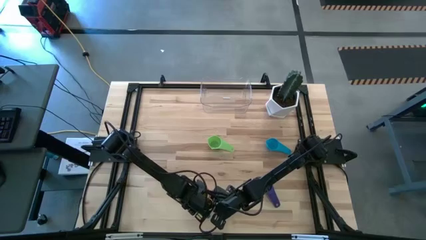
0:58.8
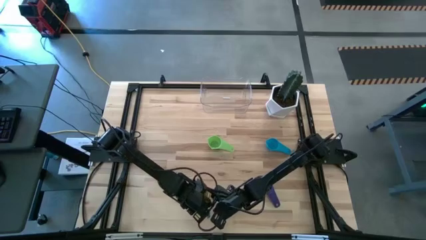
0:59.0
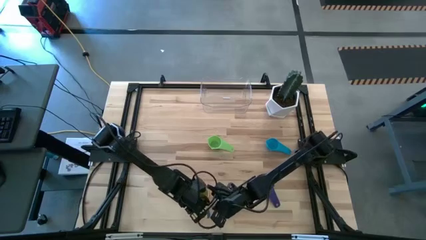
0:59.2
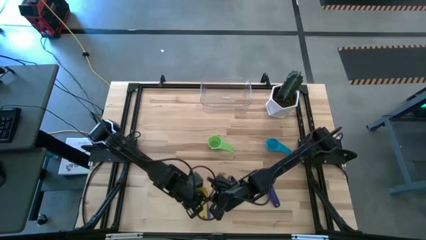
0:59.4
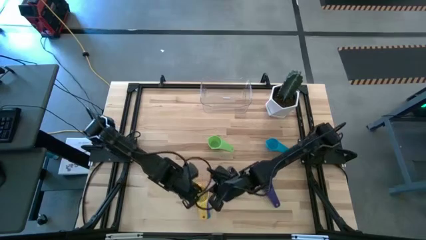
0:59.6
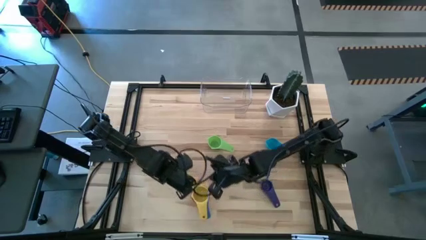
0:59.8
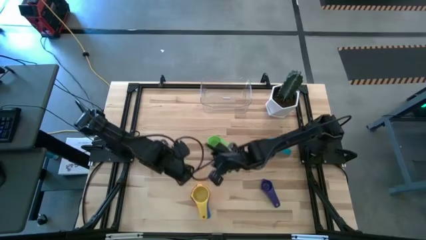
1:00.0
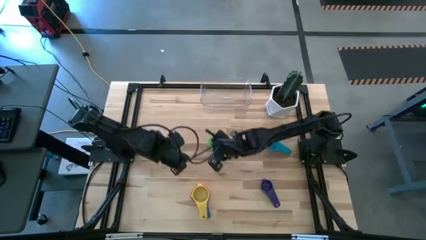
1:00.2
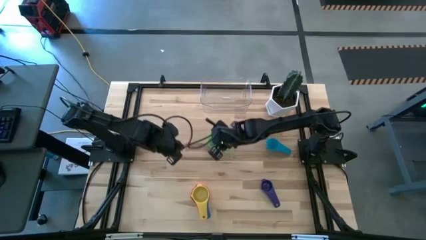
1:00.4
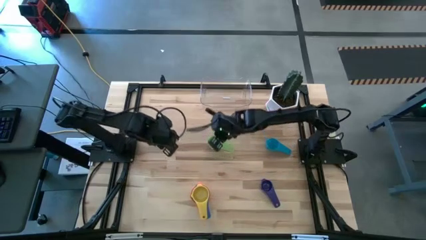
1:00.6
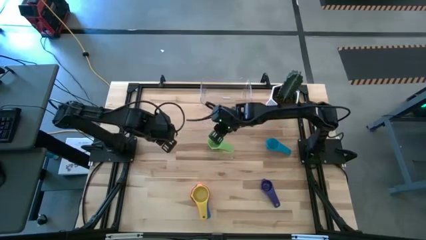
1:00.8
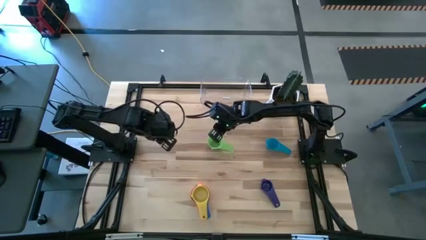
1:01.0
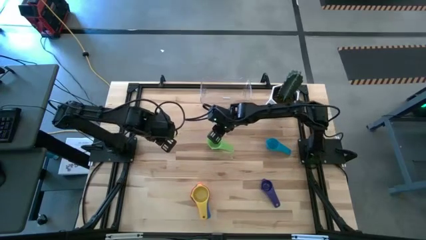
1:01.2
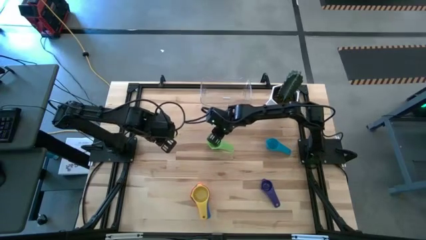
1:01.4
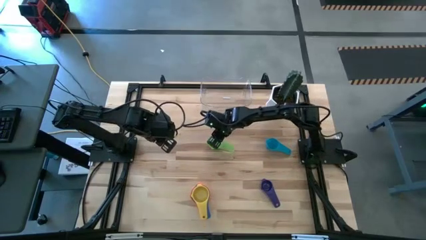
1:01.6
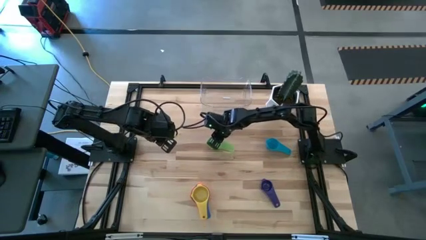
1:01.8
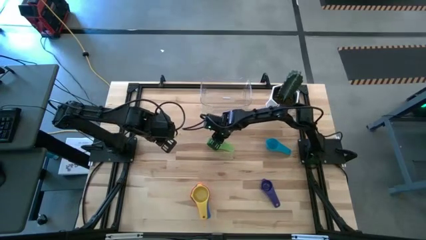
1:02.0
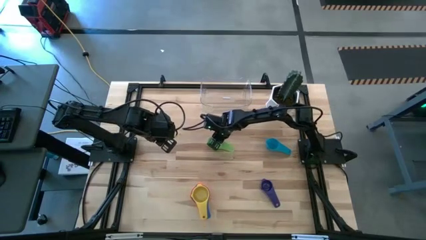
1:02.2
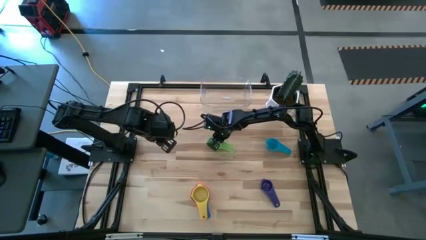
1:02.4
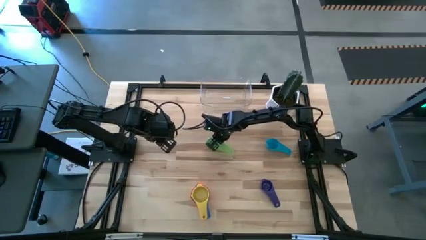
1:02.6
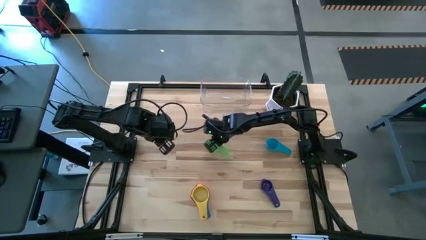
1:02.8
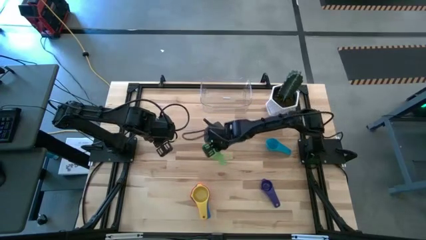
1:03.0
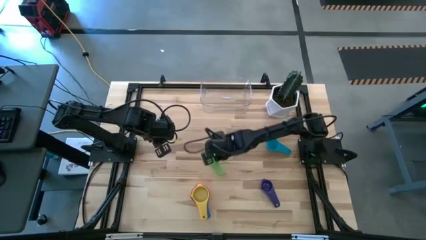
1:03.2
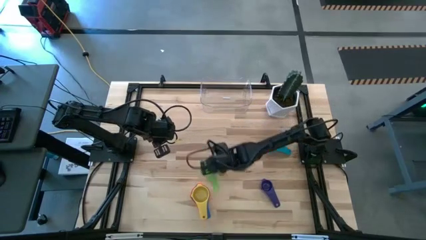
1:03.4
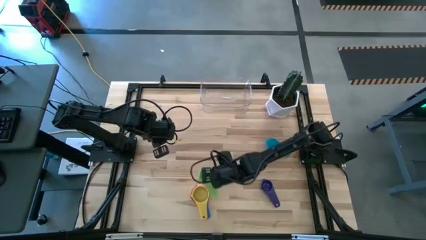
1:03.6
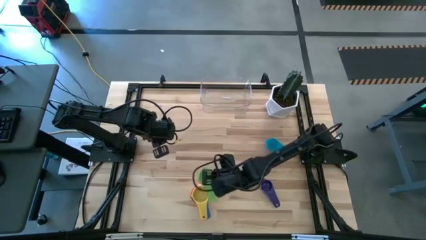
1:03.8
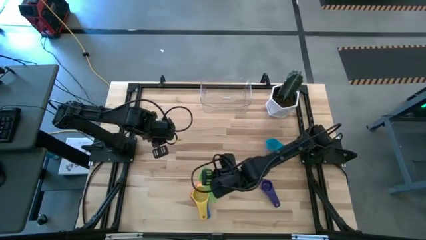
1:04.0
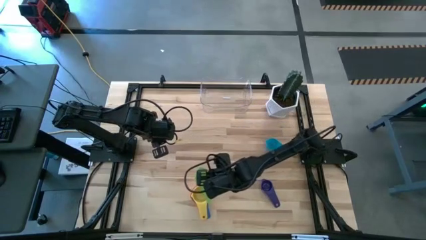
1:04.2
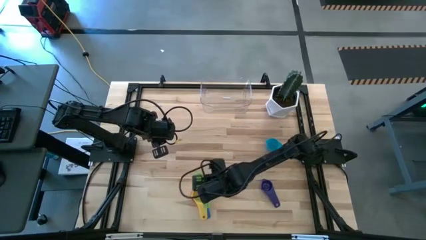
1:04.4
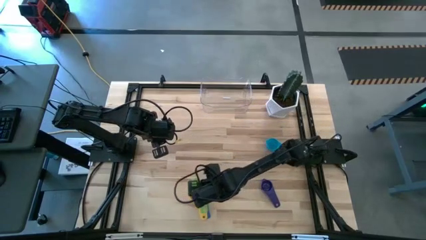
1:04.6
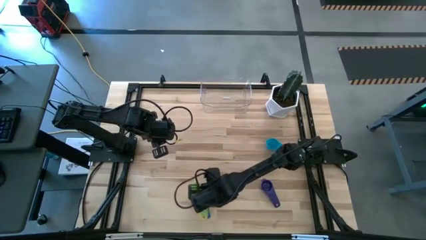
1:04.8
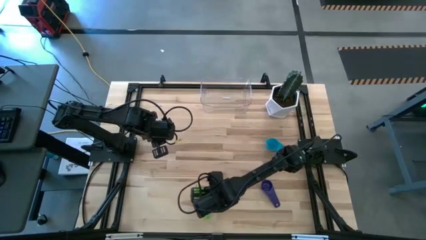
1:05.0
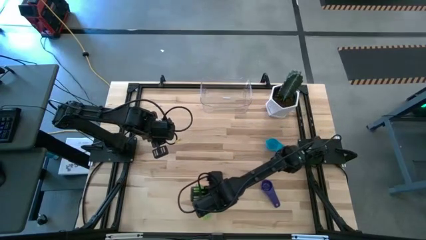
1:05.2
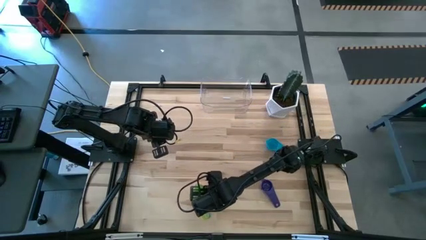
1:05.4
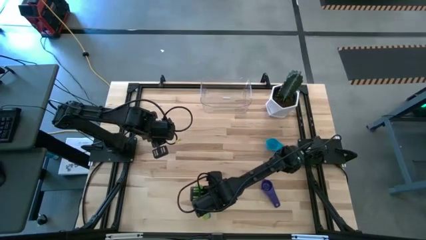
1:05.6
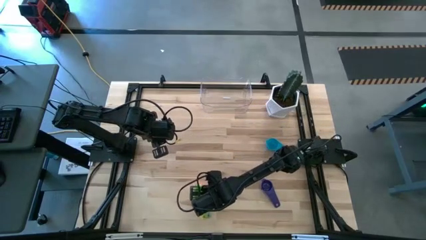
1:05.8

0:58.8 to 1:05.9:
Task: Nest measuring cups in basket
Stack the green measuring cup on top of the yellow measuring cup

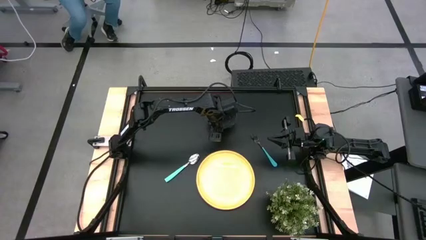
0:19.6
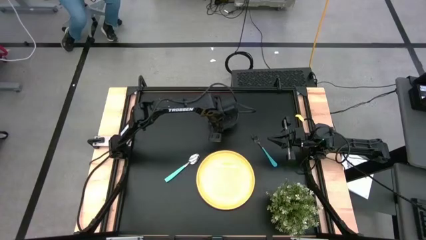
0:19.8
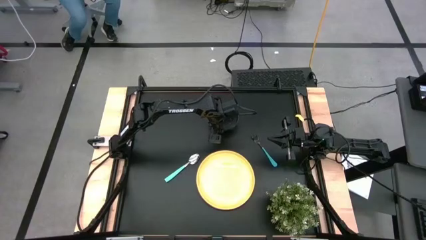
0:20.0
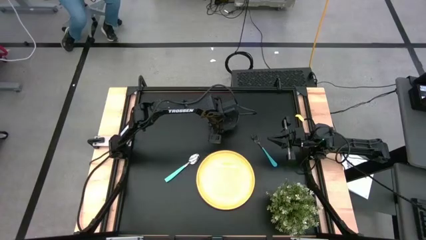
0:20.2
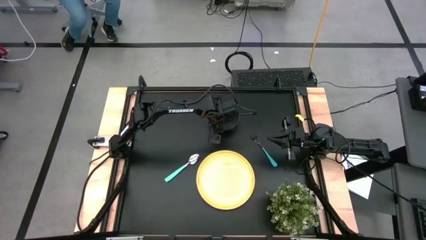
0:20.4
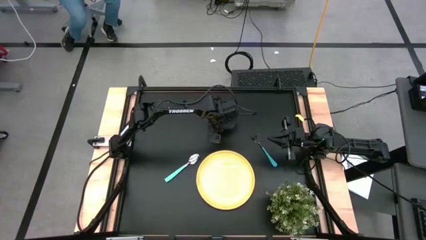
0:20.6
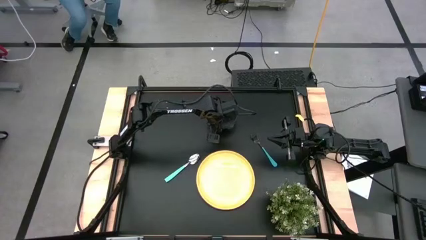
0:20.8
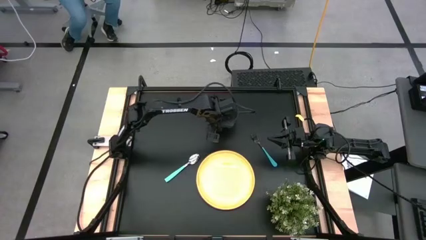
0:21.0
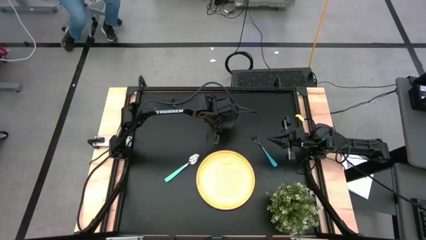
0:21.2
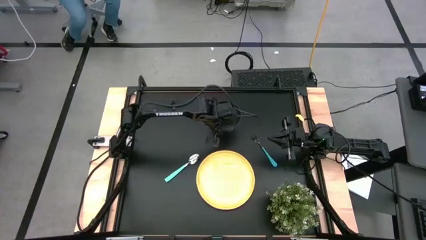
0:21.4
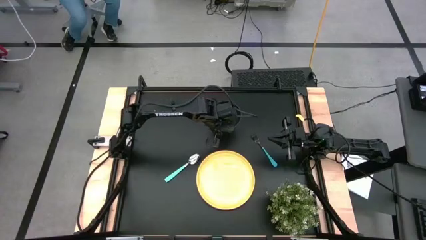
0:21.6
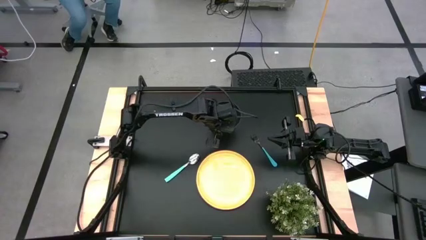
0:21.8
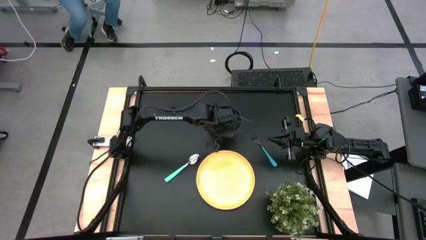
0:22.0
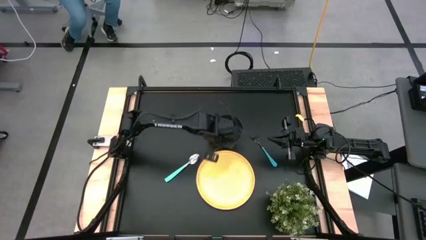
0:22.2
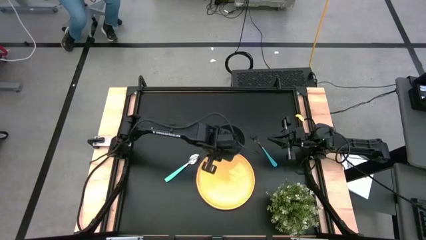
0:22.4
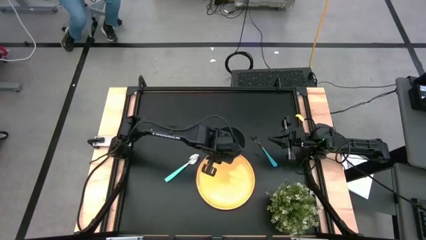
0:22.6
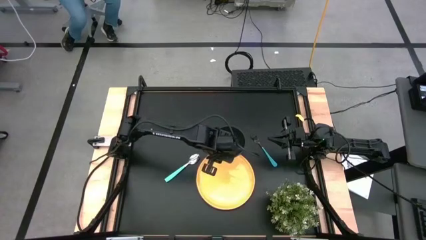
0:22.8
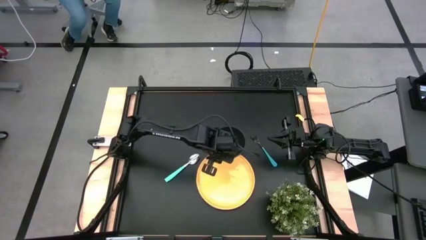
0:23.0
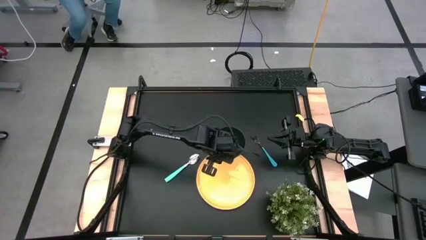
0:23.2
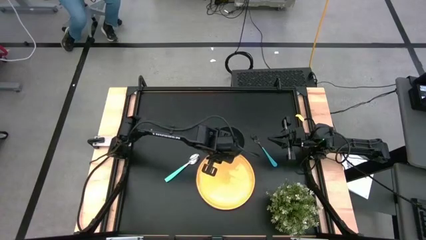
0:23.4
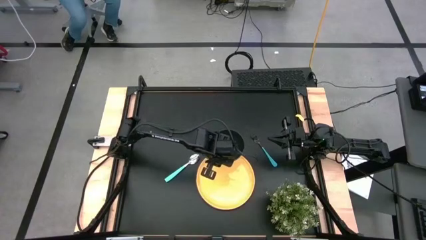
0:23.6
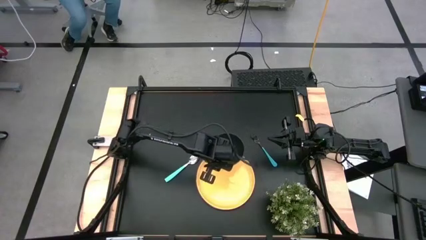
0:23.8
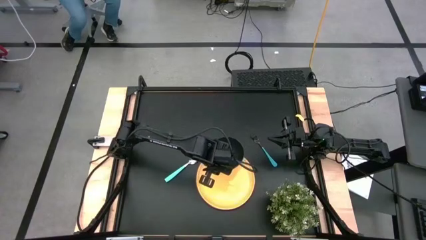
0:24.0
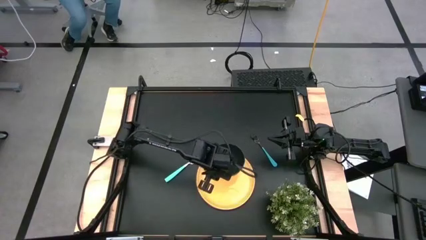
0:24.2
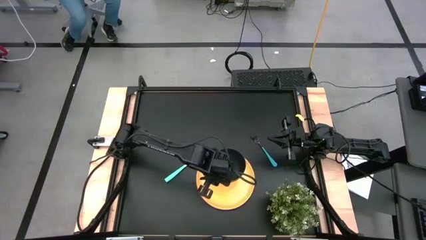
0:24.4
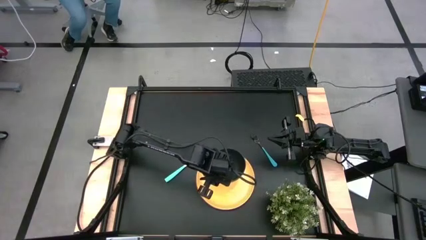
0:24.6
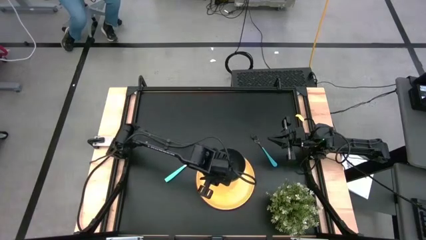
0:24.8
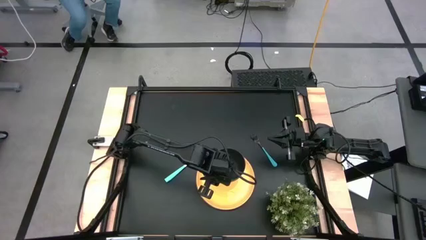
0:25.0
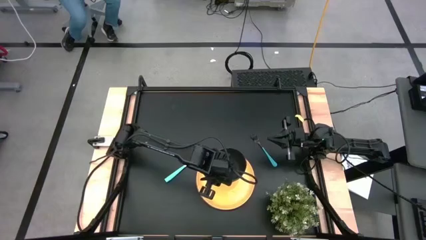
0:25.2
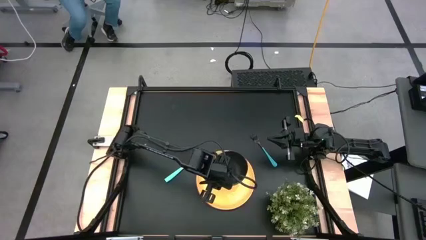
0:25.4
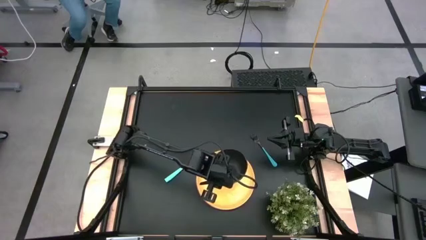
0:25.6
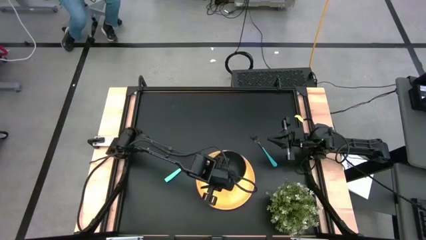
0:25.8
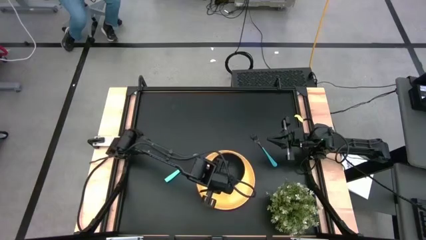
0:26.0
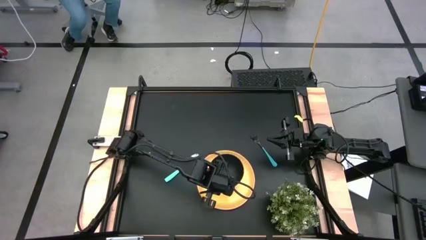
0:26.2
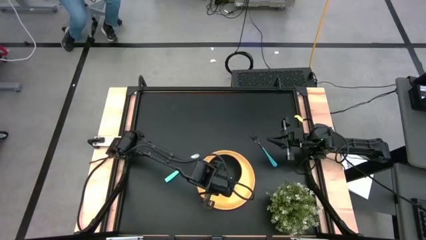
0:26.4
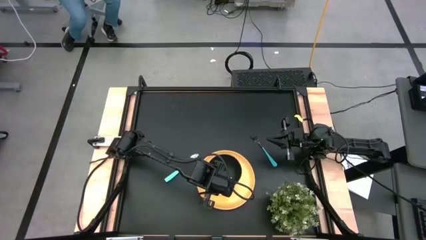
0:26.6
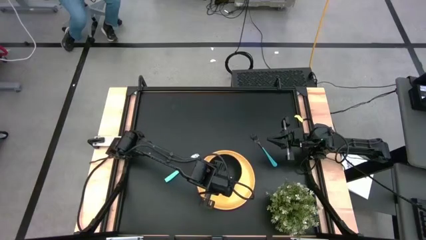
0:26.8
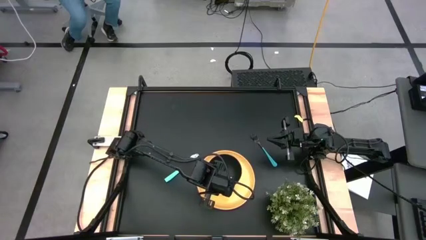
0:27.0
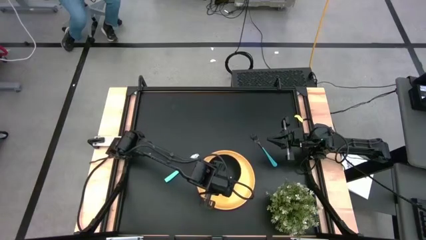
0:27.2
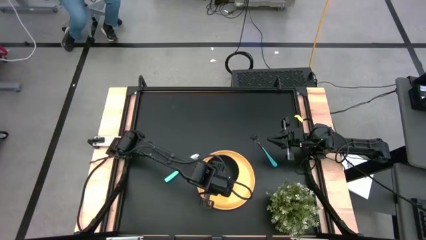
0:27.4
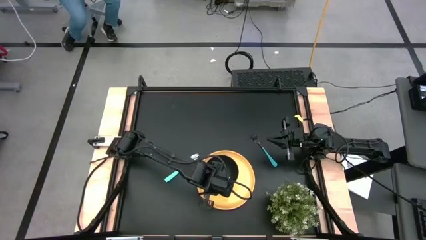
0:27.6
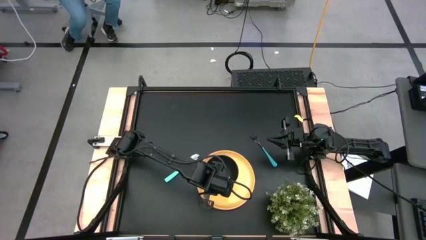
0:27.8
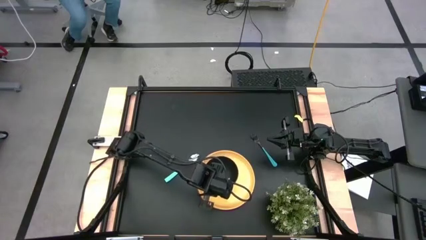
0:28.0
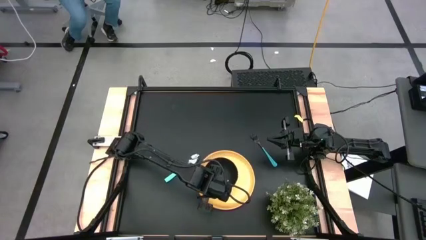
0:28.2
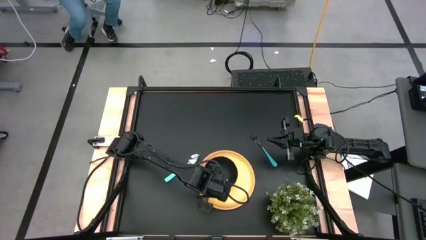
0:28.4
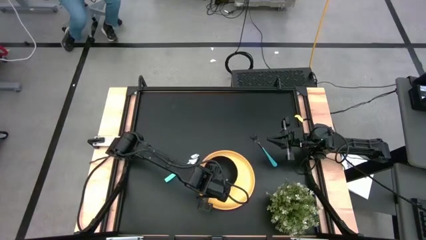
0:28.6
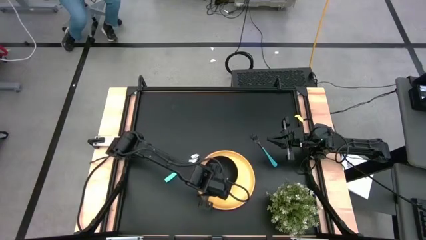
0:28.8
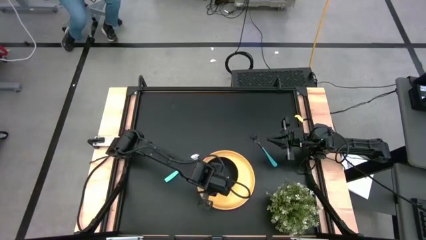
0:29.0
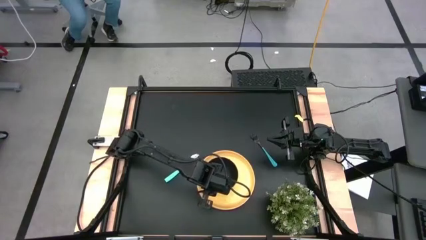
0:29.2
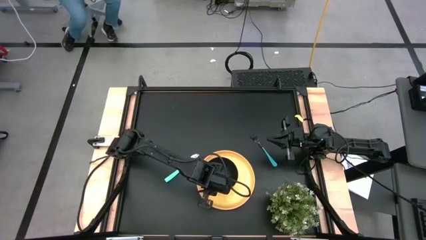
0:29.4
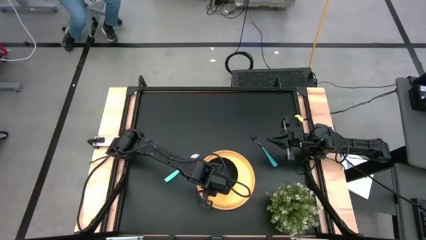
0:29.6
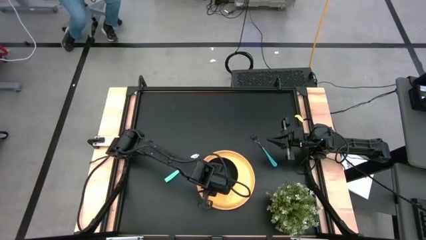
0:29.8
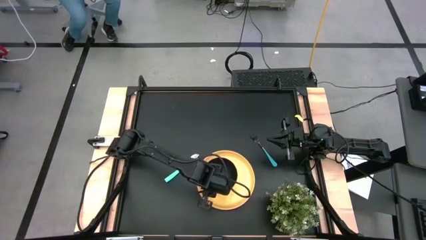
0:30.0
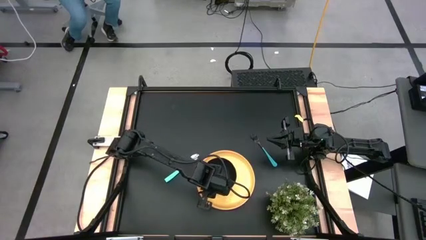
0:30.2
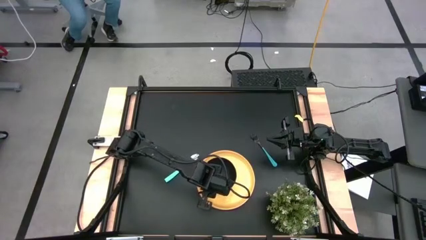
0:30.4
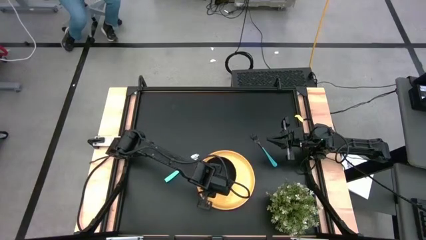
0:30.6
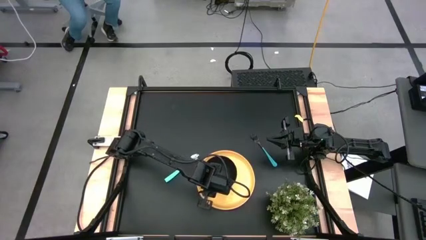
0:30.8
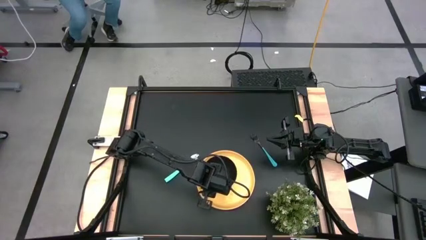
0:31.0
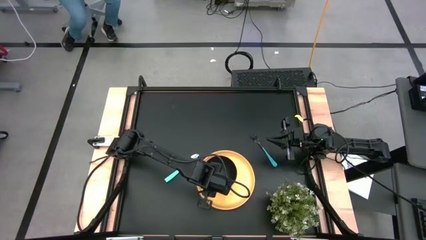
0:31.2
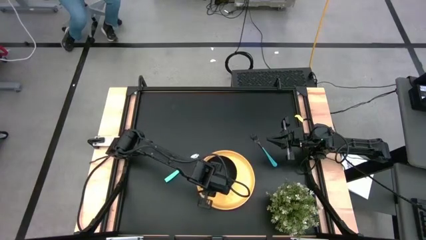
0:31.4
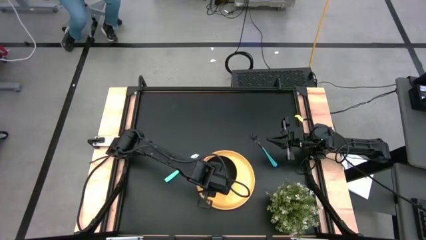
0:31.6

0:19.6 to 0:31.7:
Task: Pick and place plate/cup/fork/spoon on tray
Put the black bowl on the yellow plate
